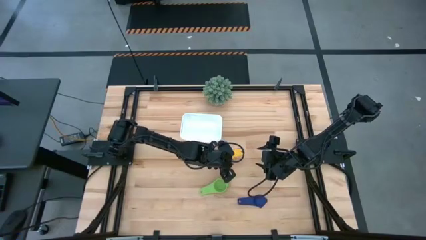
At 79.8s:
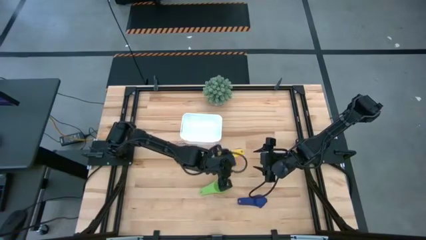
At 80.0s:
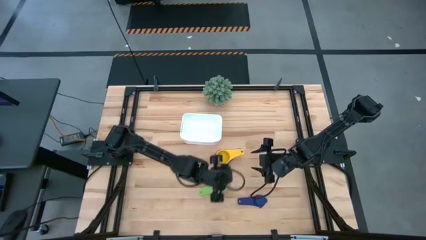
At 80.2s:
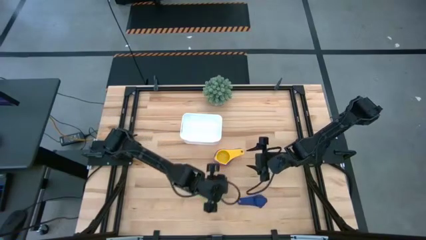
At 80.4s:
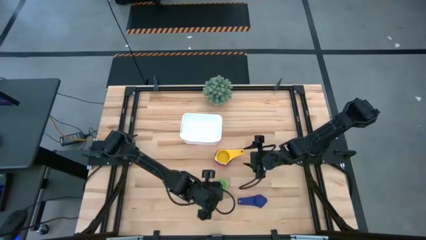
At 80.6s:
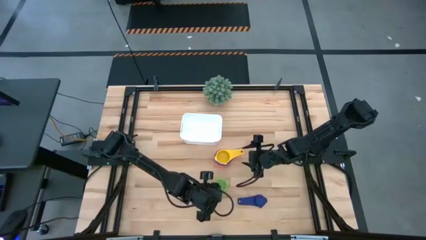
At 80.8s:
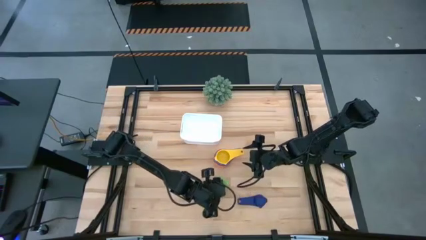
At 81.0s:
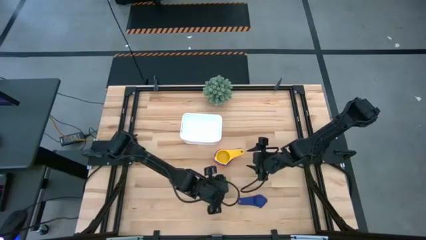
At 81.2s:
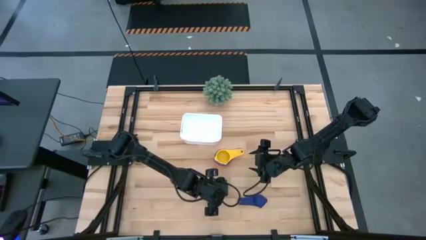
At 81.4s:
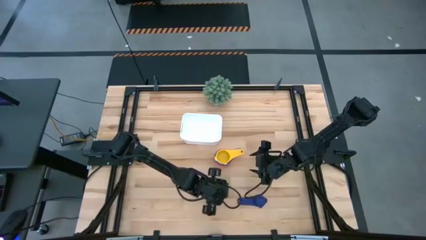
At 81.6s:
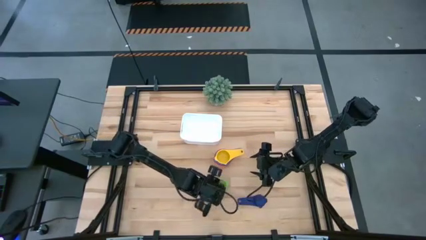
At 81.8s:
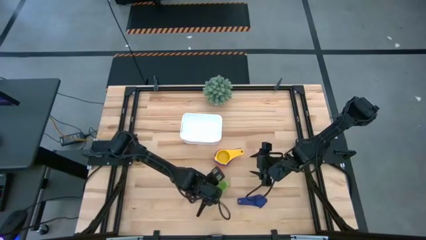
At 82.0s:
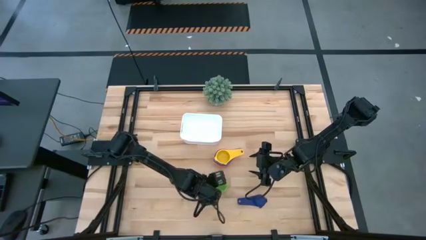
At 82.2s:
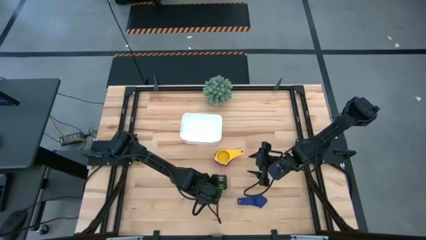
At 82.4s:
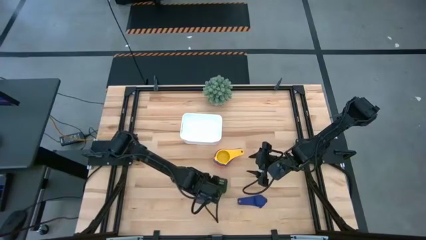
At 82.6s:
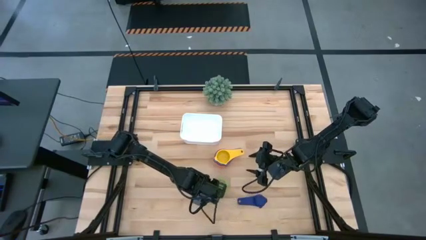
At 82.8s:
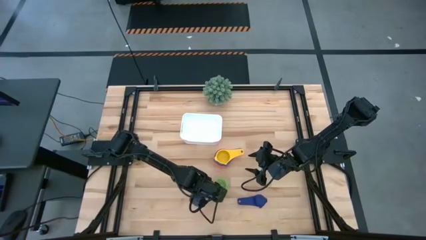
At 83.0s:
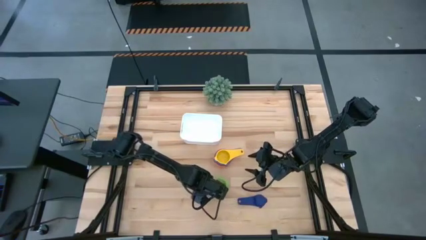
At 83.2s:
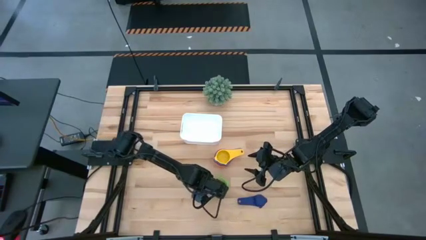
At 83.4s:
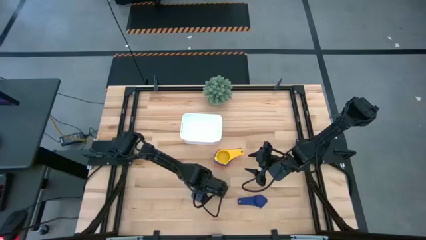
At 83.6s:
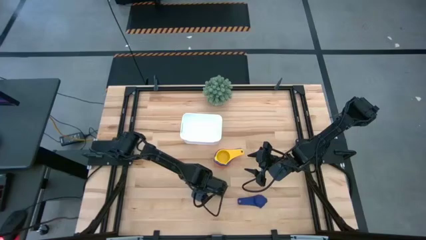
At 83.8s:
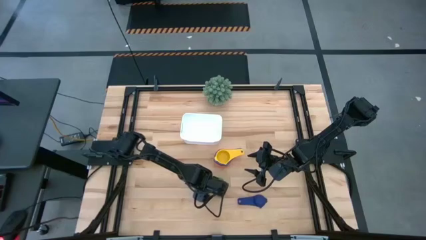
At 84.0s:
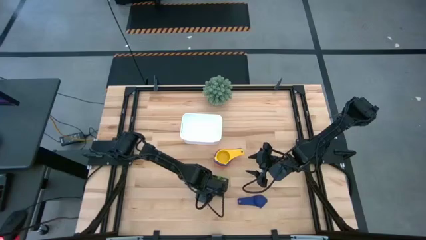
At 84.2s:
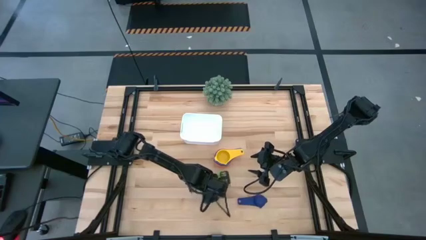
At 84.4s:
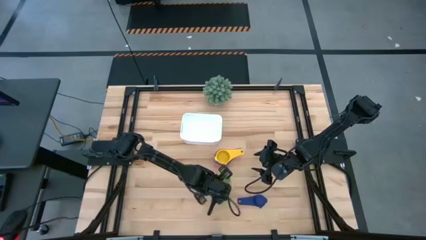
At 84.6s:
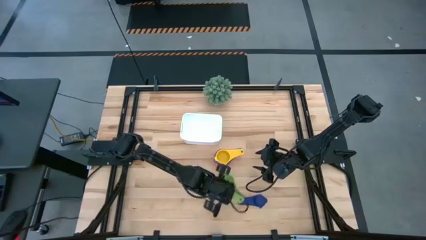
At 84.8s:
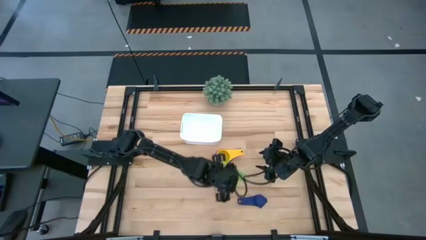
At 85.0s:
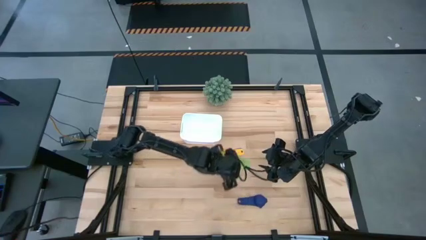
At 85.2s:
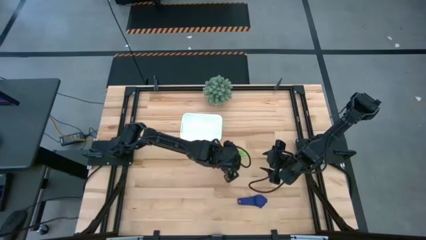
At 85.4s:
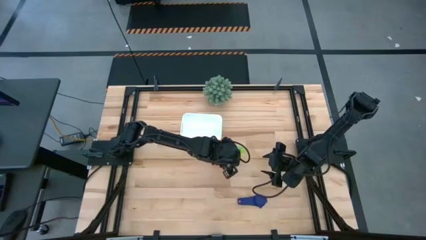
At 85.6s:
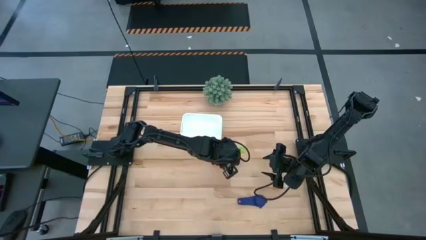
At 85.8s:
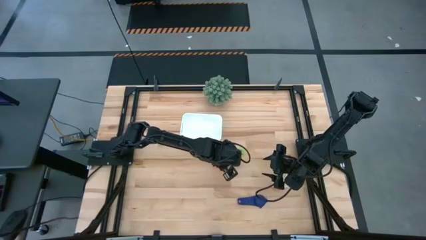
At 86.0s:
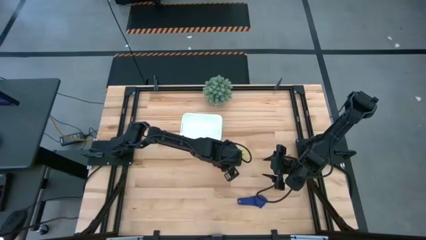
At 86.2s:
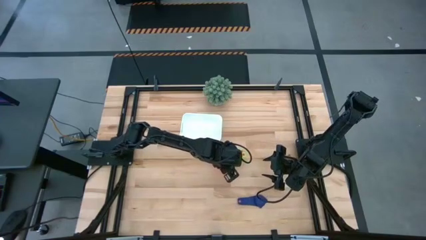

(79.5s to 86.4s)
Task: Nest measuring cups in basket
Stack the green nesting cup on the yellow nesting cup

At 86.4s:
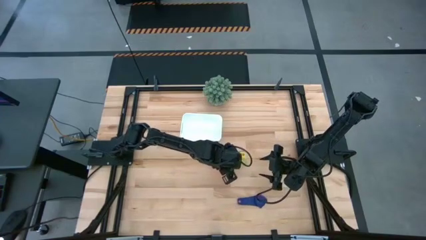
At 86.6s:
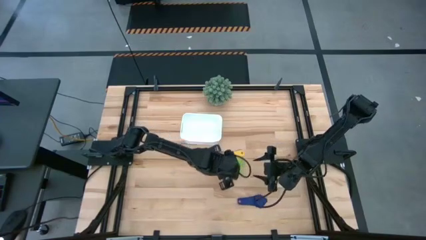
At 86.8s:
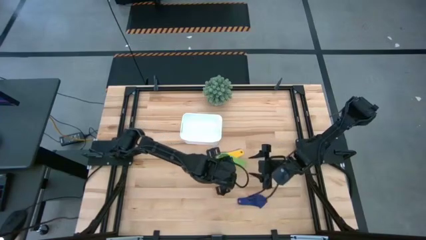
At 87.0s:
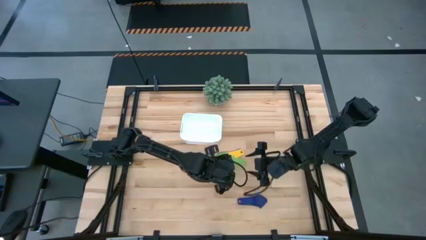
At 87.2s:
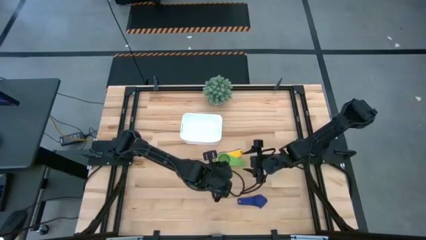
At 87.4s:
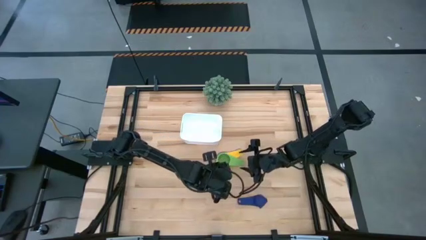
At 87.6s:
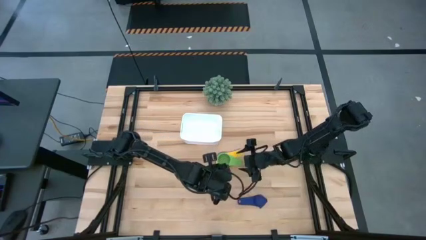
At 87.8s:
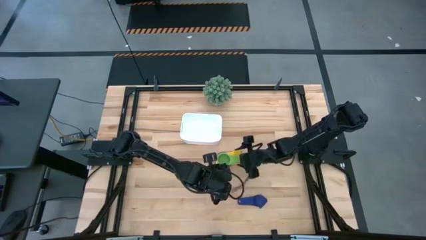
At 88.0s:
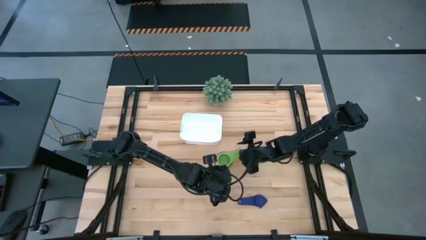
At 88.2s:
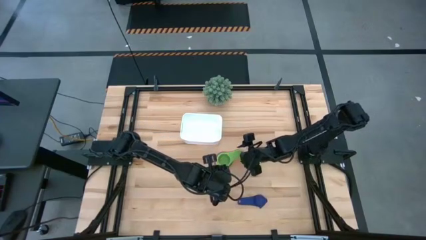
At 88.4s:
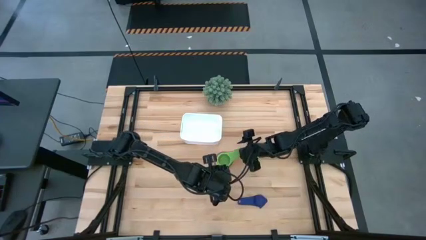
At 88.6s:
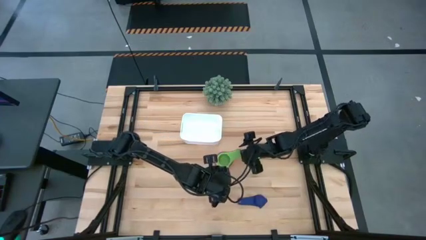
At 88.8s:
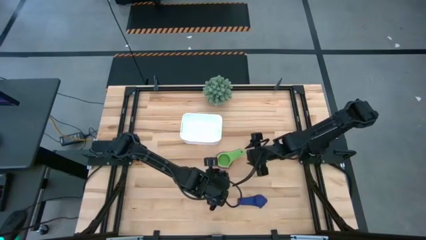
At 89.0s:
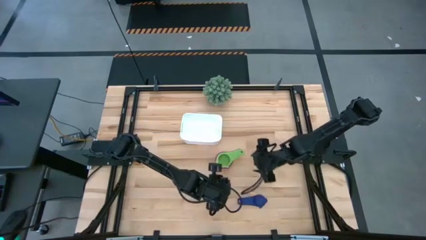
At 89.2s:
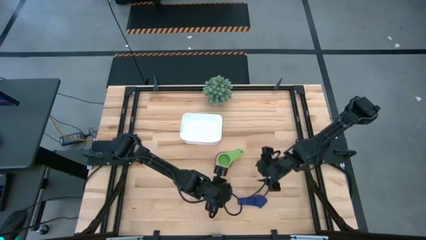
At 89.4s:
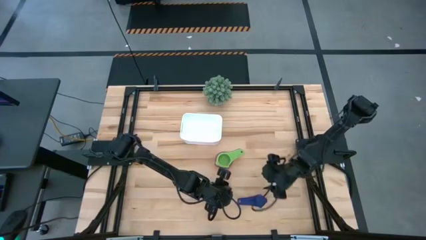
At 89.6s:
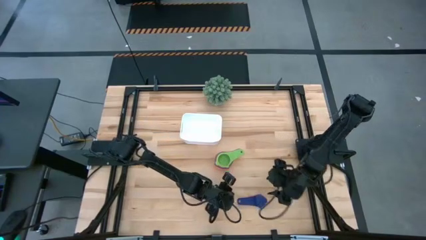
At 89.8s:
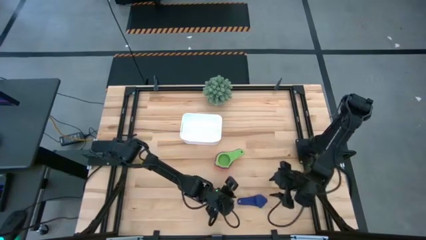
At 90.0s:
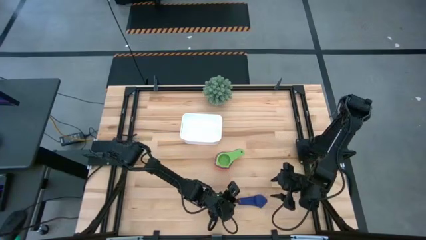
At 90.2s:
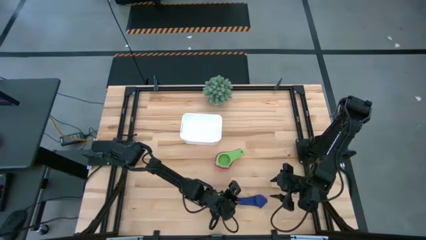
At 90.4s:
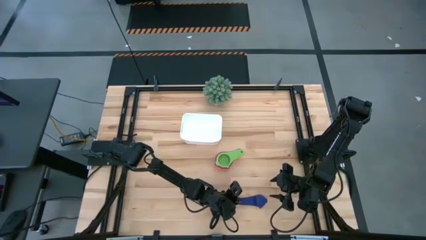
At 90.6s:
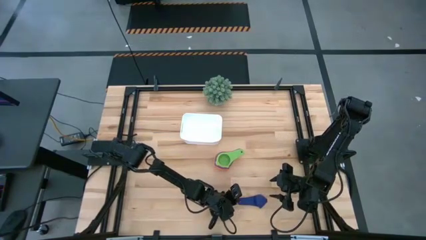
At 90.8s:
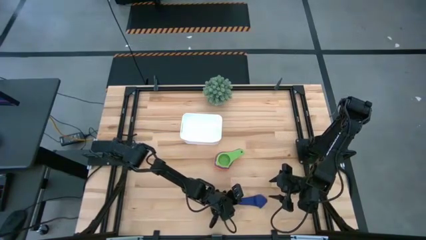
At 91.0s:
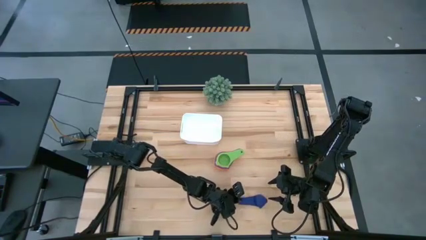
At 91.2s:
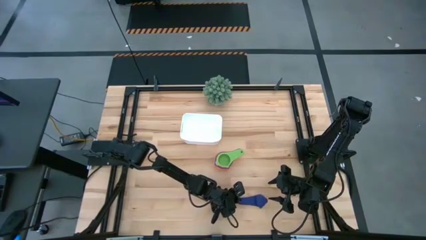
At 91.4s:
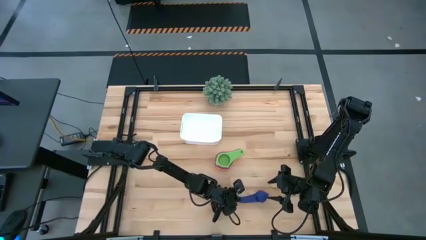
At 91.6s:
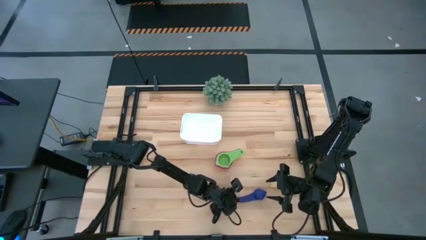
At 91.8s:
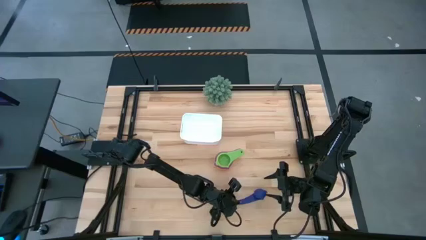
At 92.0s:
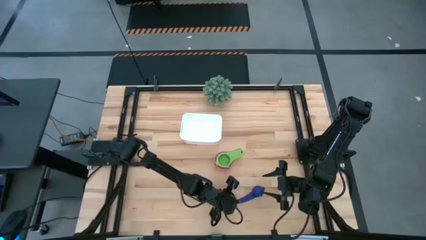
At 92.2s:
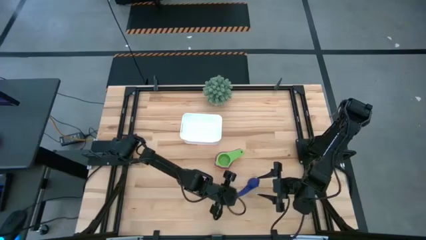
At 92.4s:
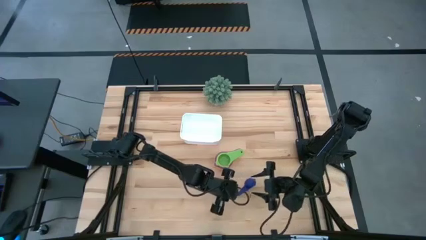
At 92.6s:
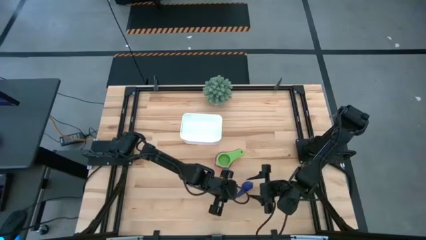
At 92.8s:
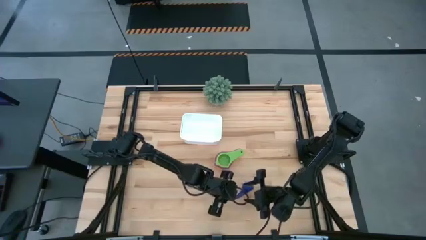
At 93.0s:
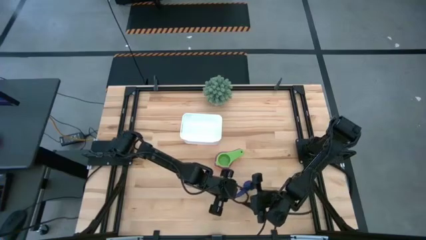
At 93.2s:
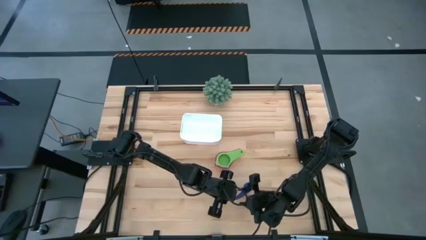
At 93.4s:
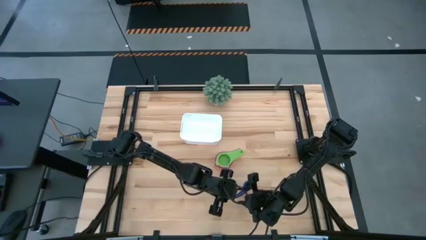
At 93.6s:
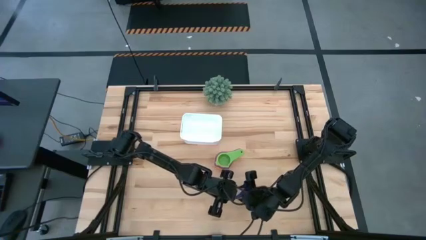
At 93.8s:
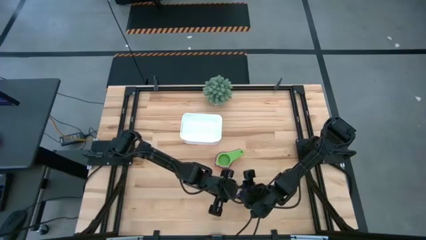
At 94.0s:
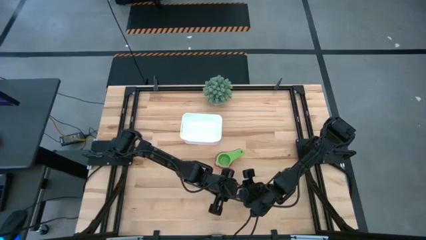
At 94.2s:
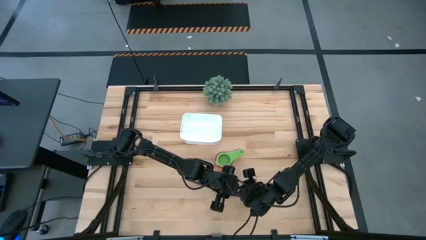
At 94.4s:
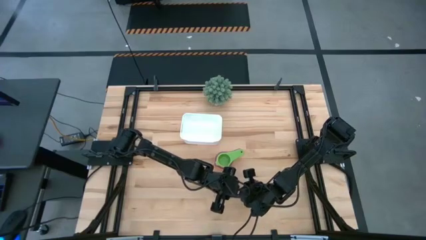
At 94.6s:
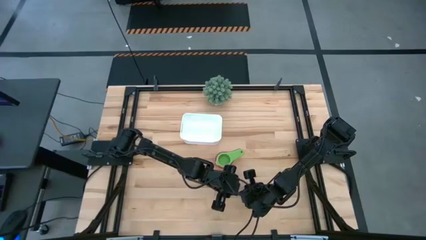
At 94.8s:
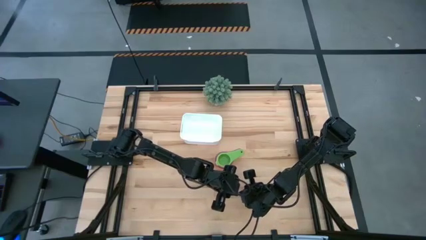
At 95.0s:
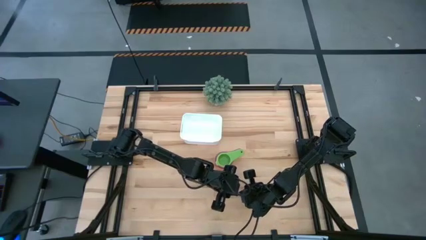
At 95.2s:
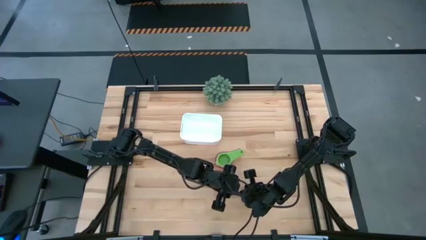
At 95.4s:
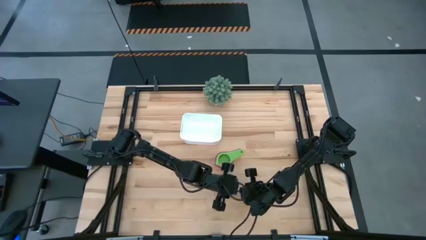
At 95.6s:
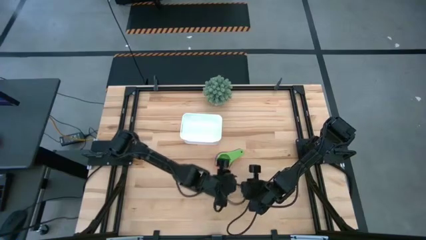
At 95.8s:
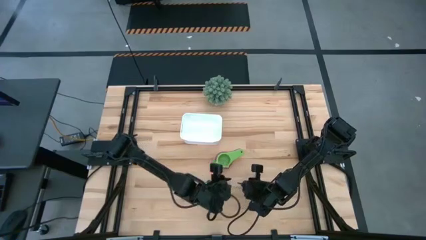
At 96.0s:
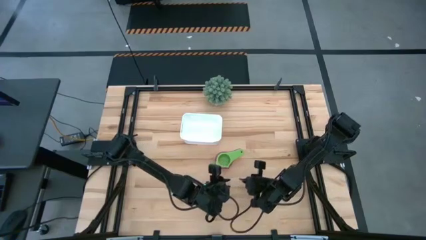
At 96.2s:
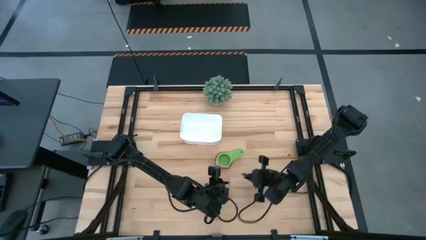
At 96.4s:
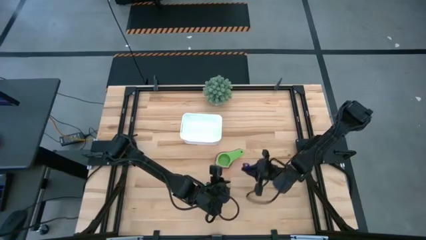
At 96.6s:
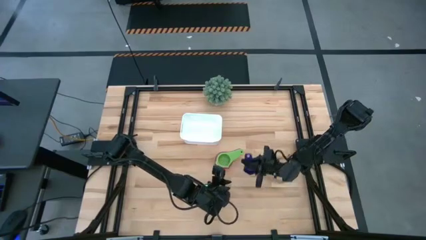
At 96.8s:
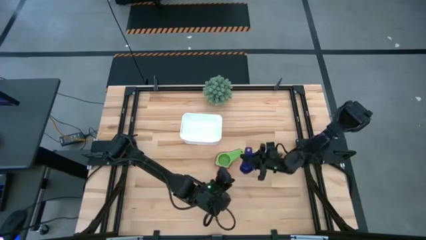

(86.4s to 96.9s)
Stack the blue nesting cup on the green nesting cup
